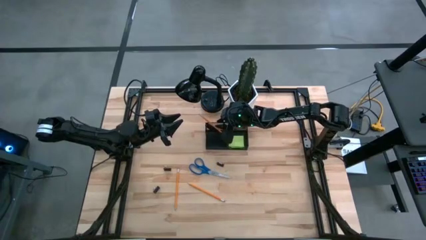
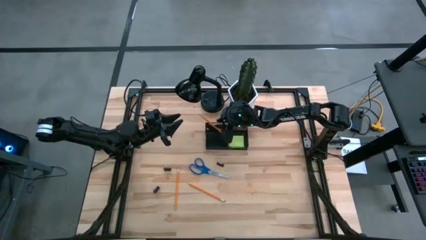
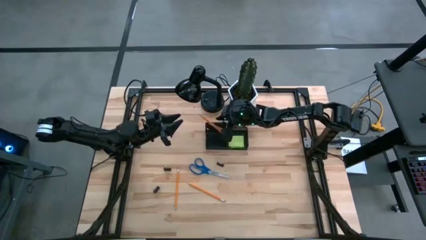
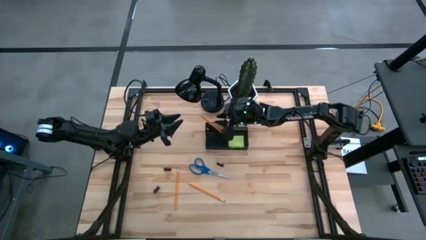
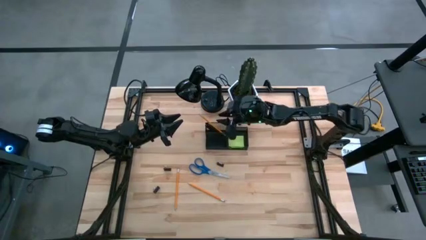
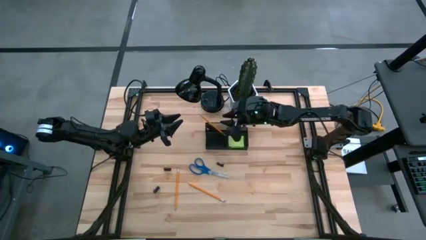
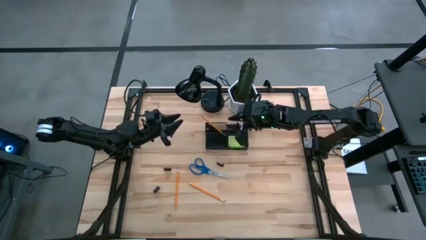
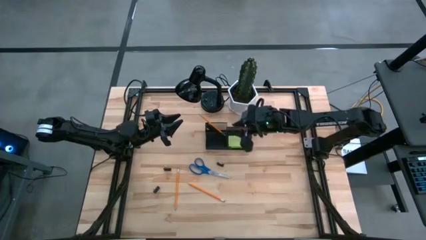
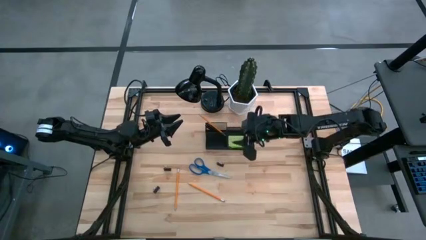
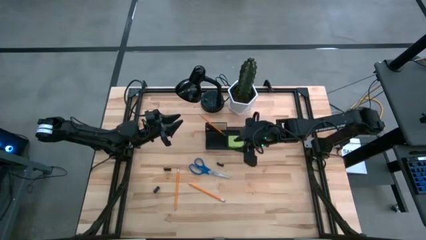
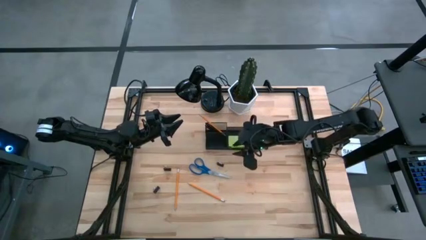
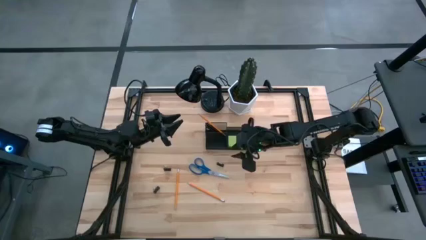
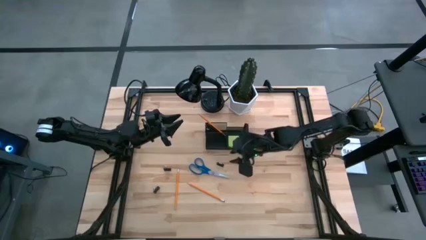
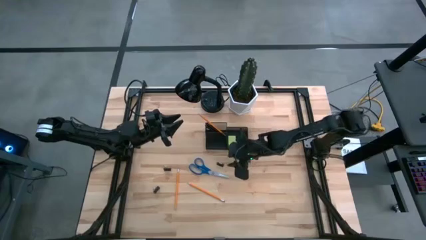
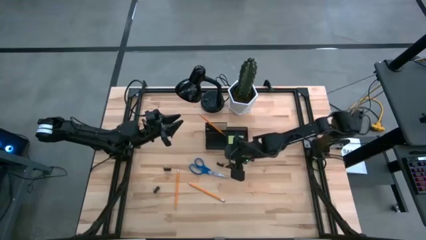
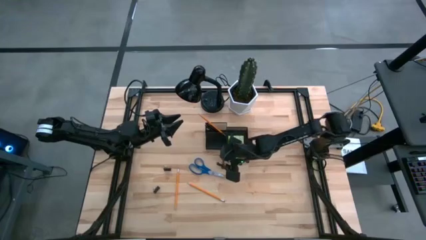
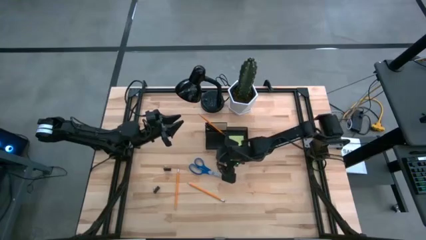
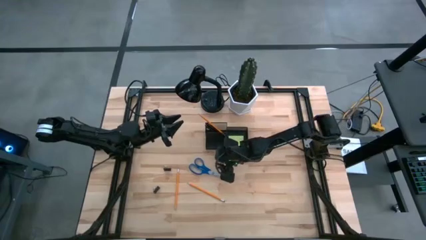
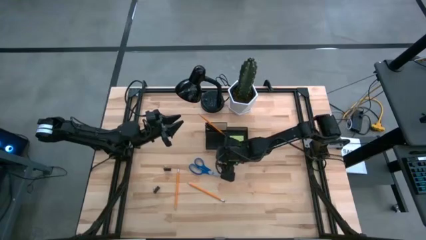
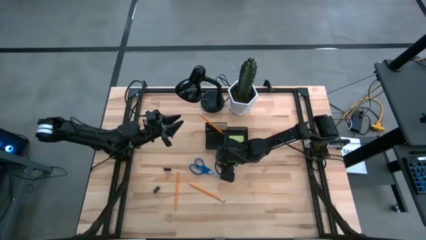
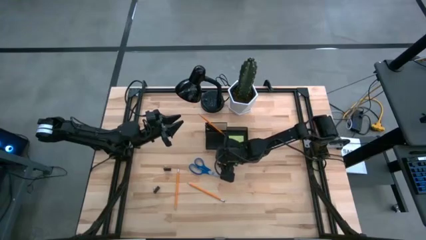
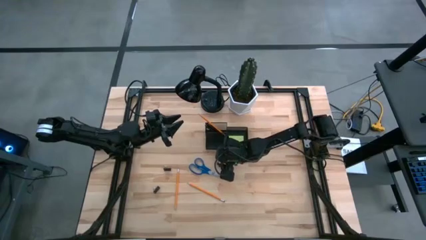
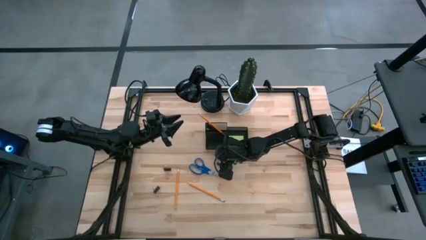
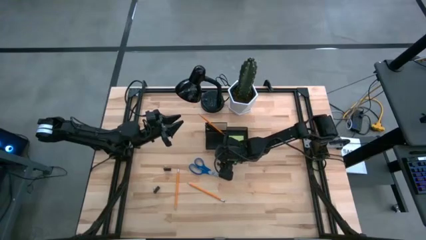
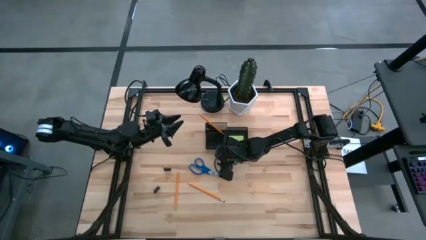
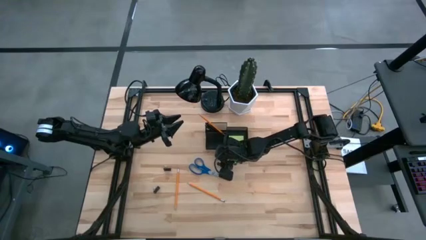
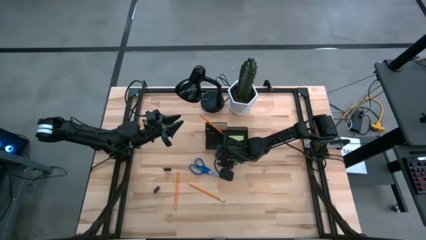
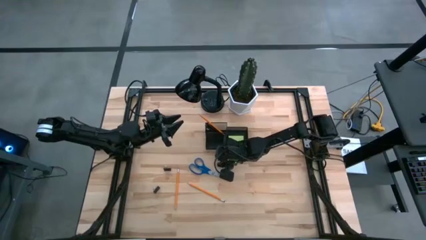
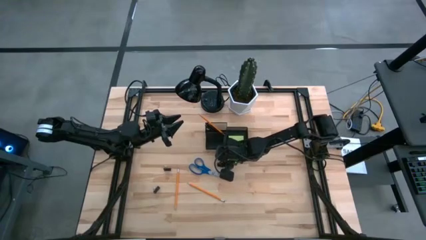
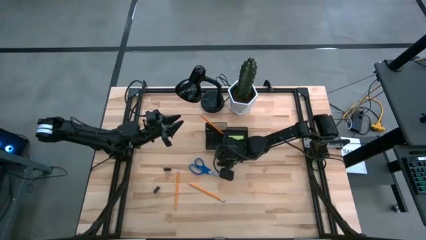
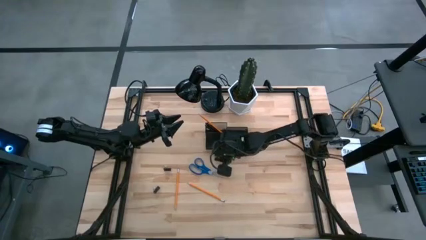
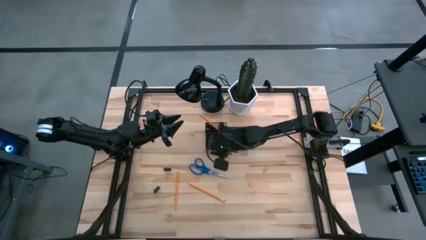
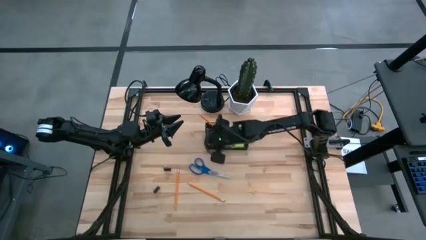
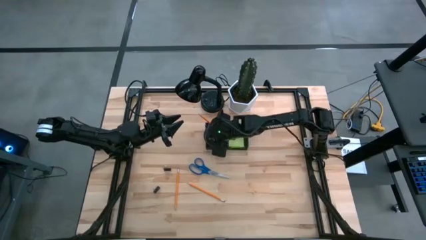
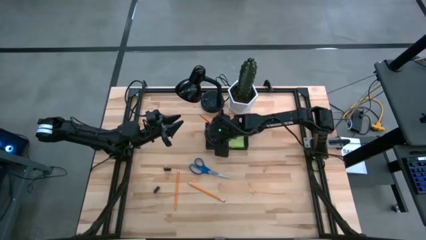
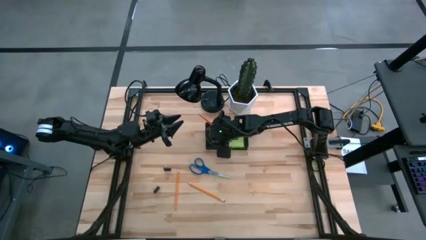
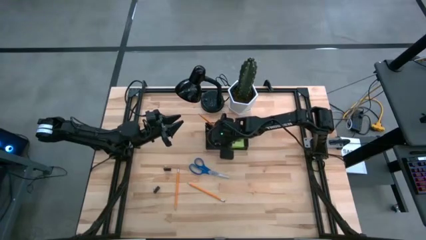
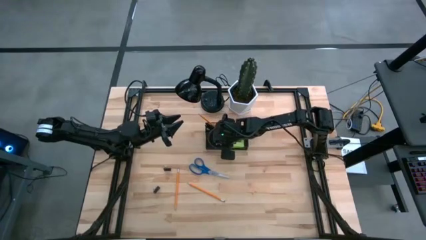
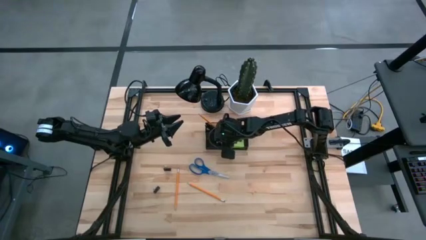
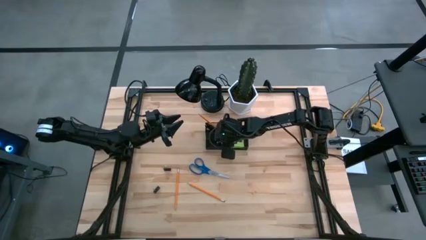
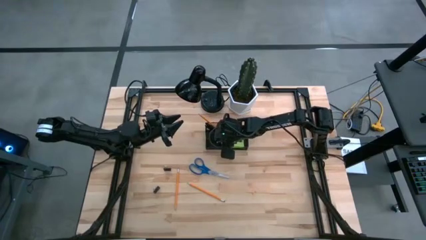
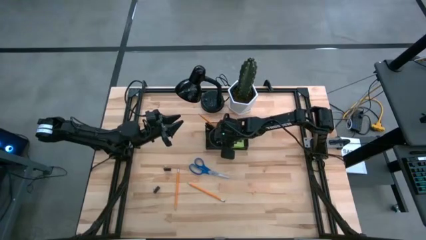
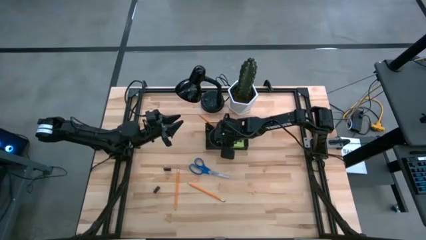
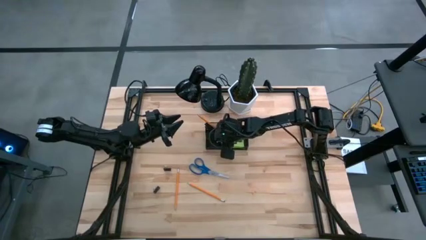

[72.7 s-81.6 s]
Task: Pick and place office supplies into organizer
Put the top right clip into the mesh desk organizer

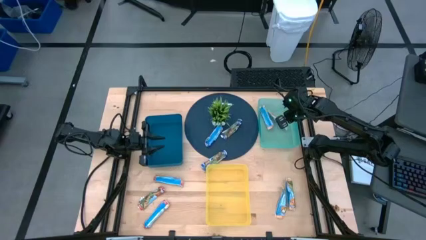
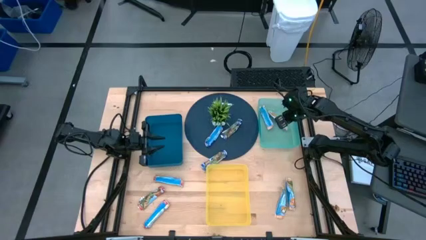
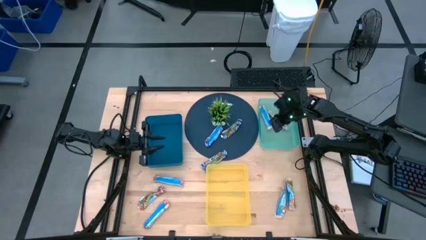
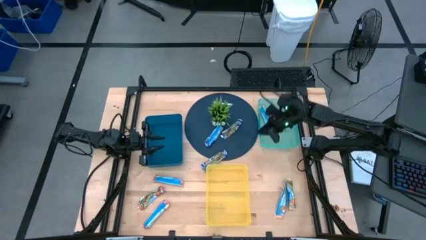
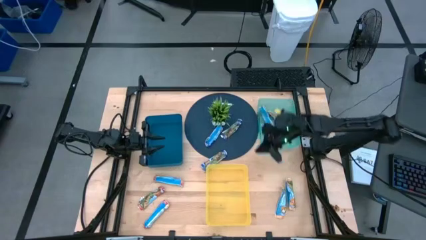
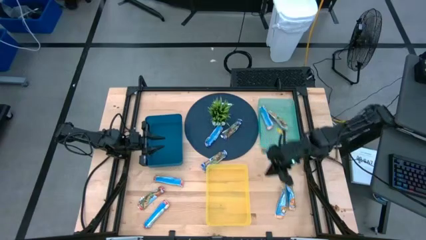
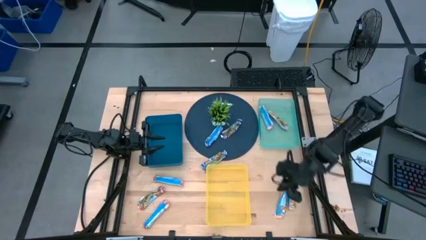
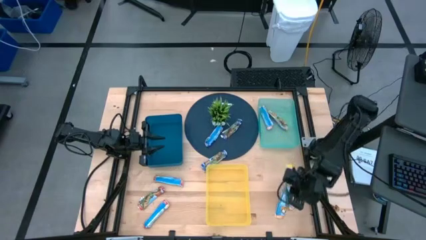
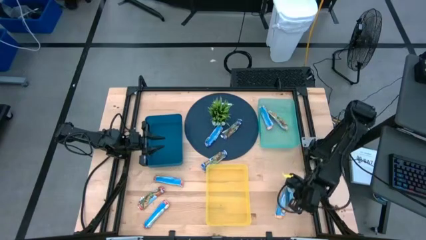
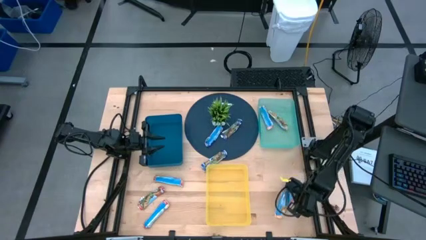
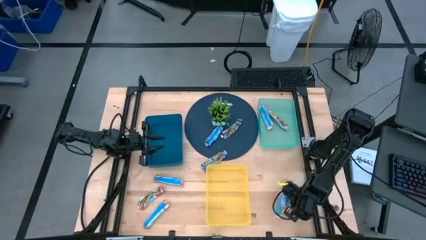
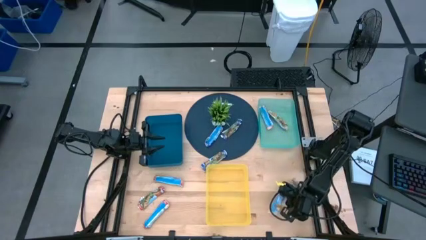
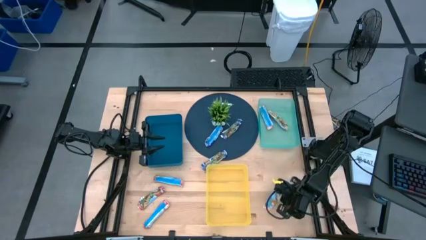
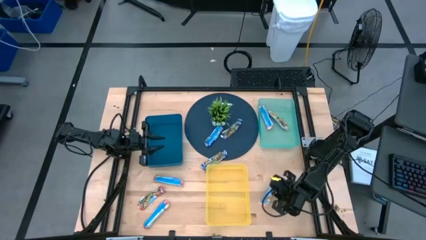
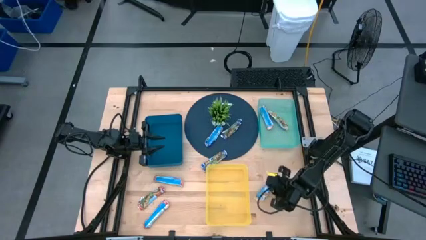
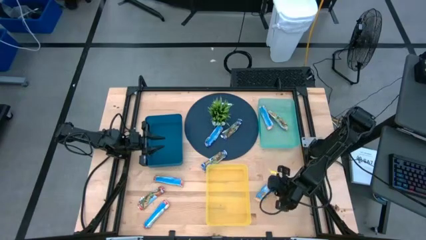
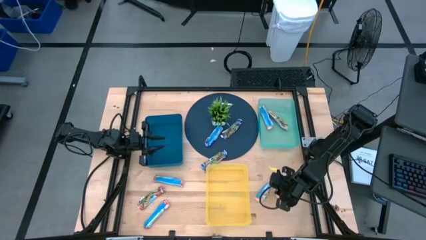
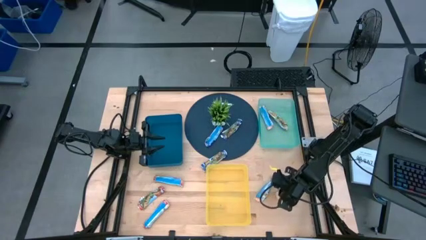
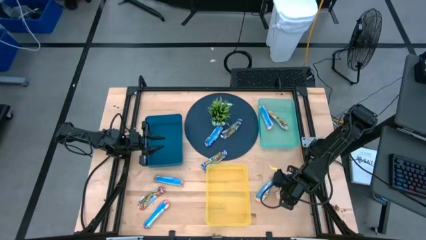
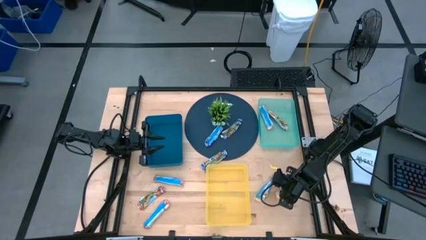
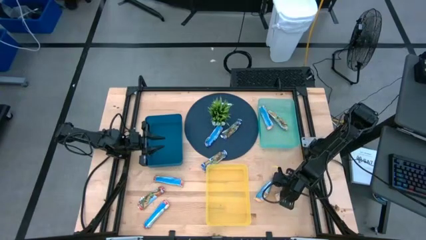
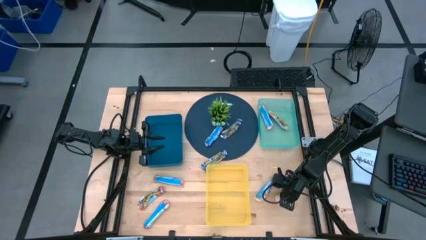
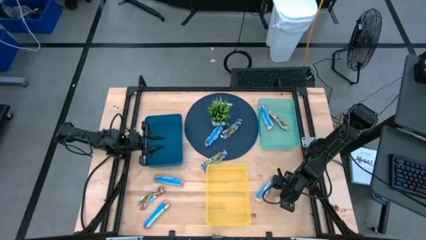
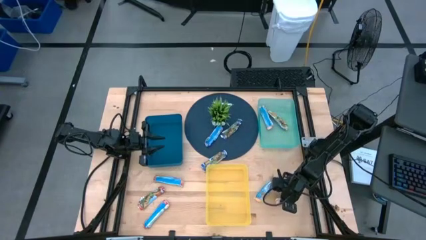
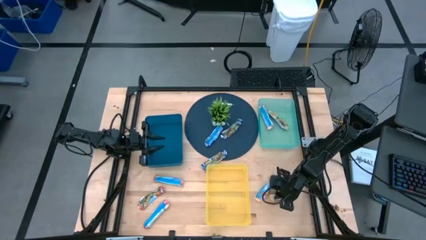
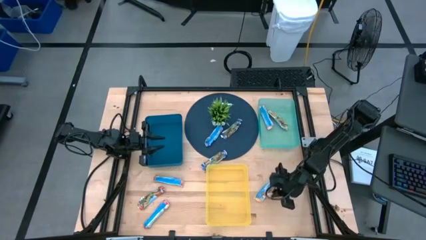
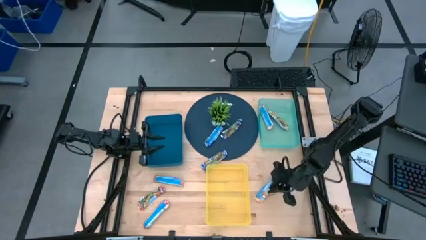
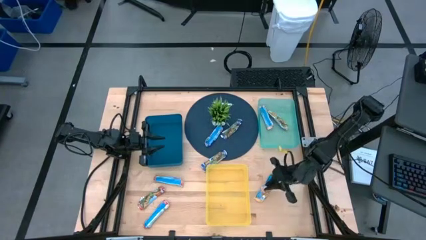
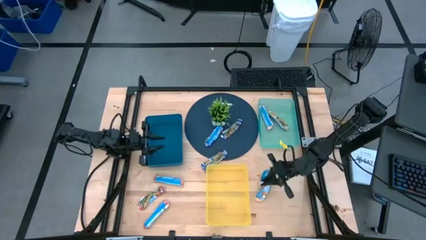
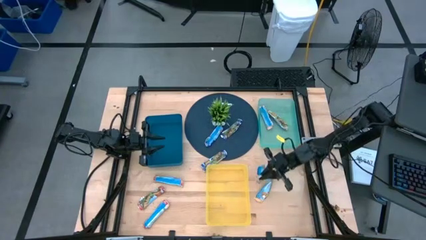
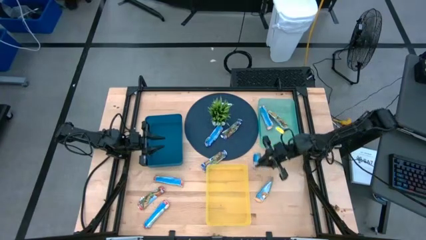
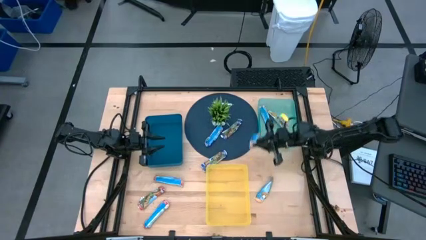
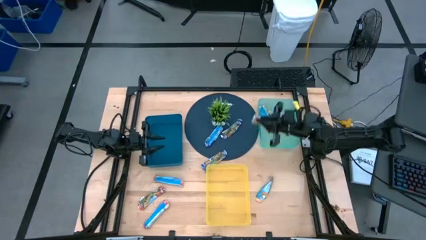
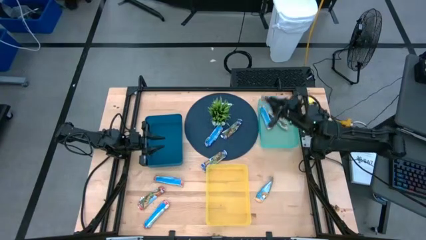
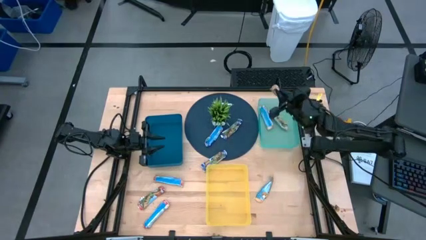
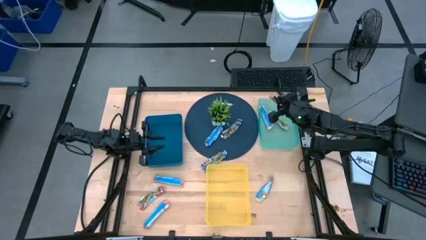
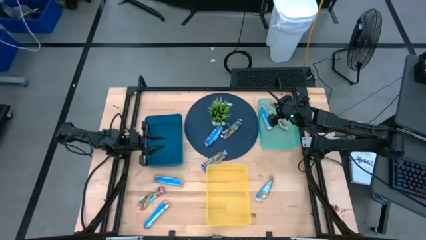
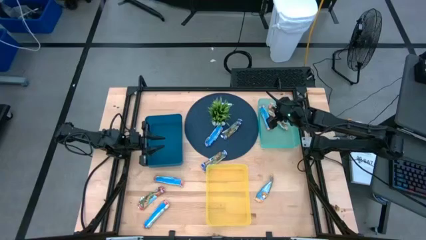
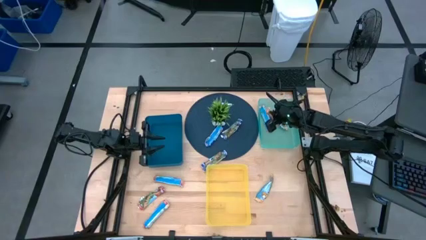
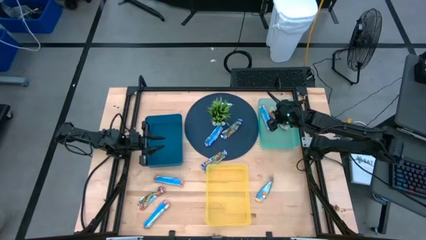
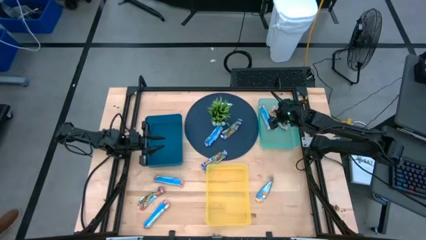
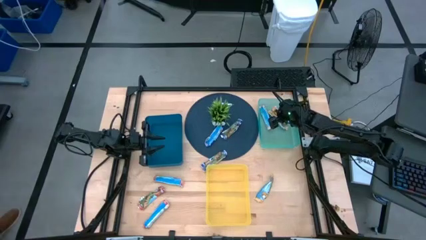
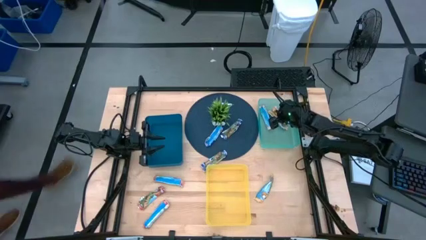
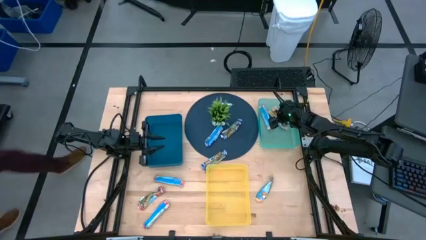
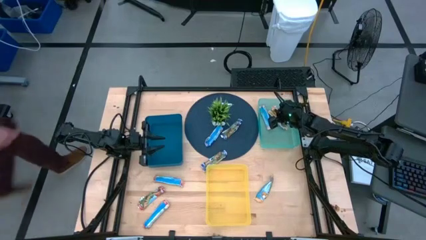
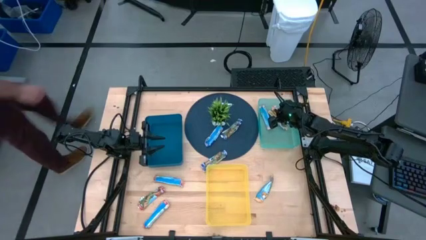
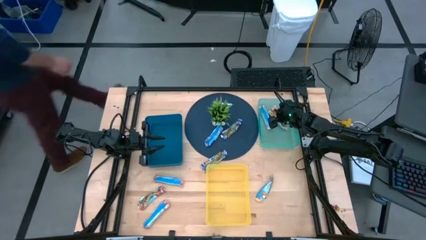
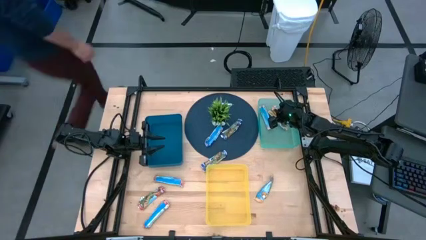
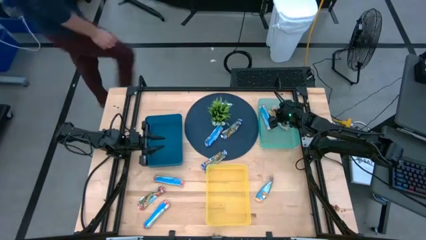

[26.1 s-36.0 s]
Task: Pick and place Granola Bars by type
Put the yellow granola bar into the green bin
